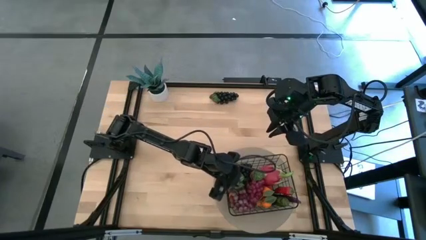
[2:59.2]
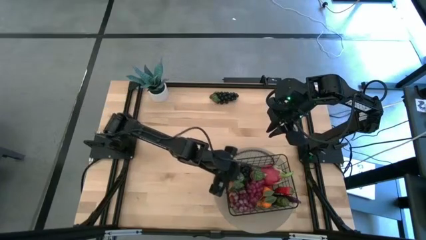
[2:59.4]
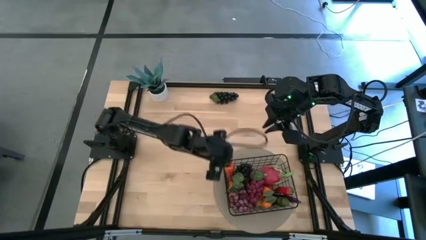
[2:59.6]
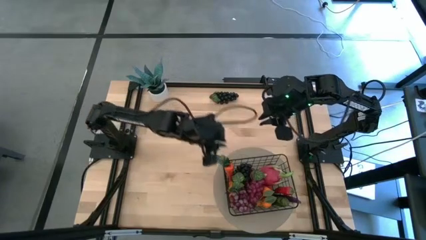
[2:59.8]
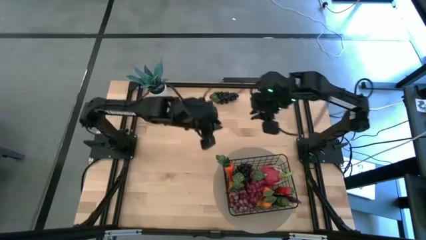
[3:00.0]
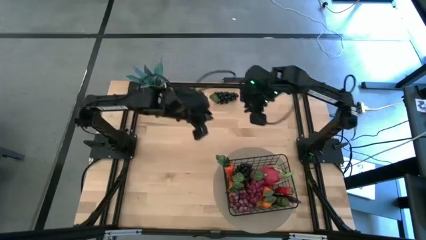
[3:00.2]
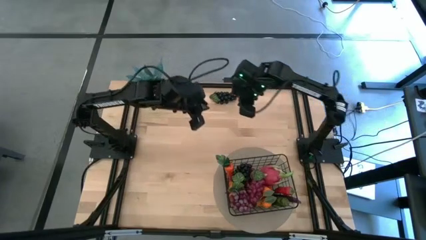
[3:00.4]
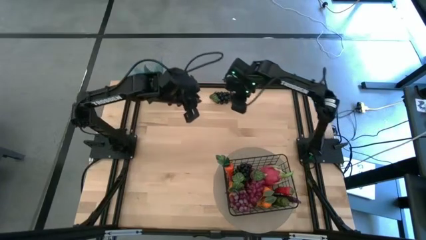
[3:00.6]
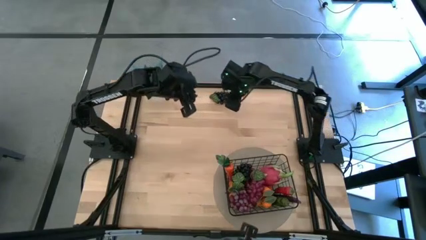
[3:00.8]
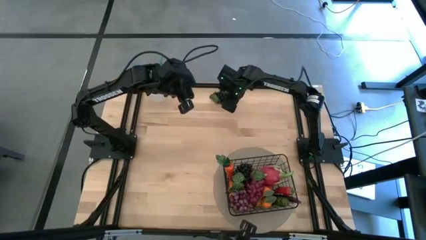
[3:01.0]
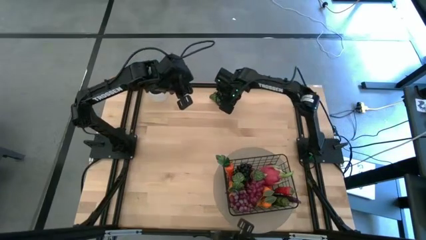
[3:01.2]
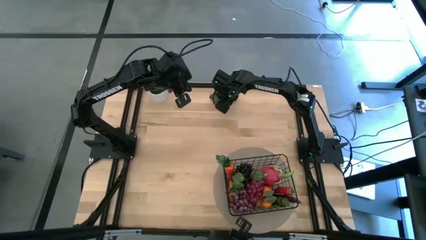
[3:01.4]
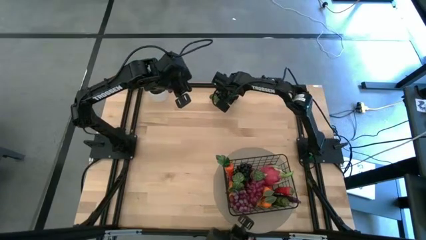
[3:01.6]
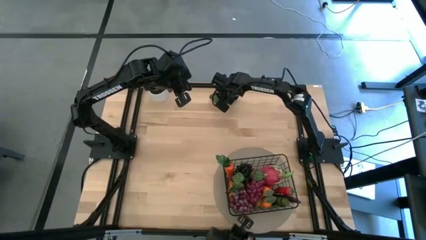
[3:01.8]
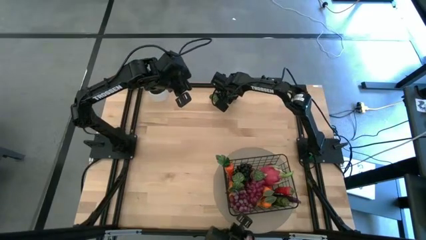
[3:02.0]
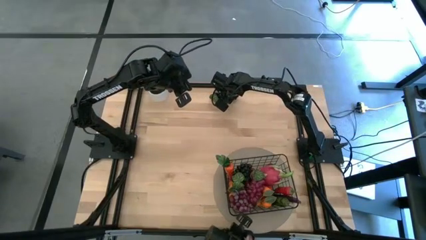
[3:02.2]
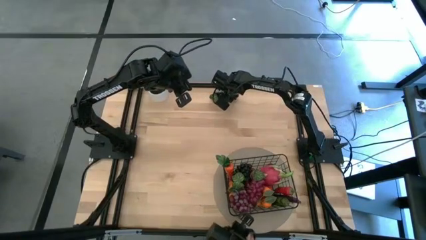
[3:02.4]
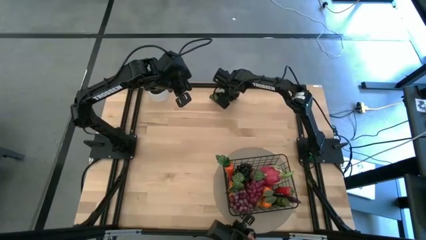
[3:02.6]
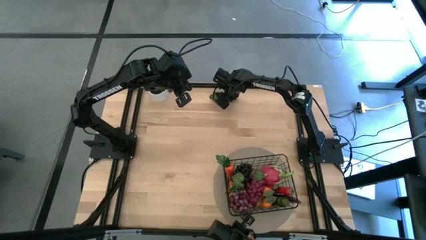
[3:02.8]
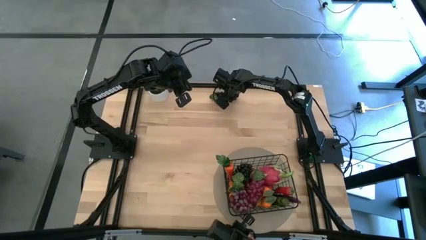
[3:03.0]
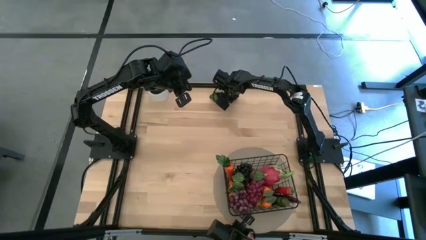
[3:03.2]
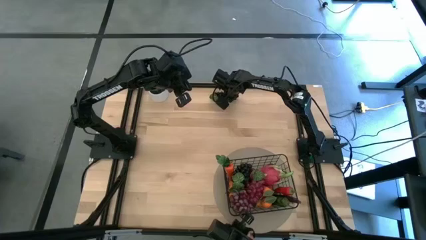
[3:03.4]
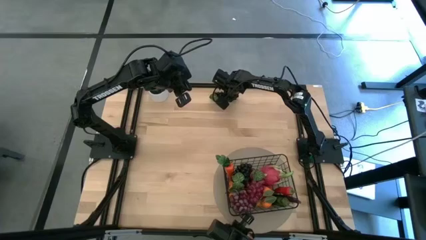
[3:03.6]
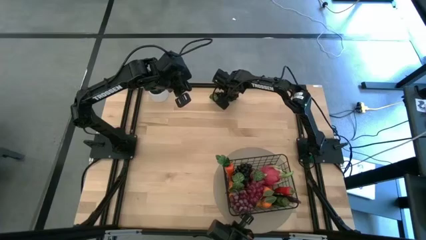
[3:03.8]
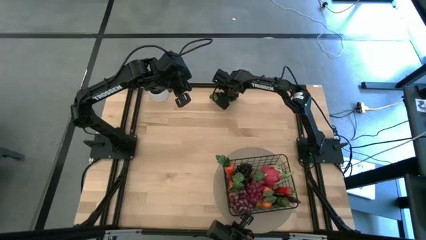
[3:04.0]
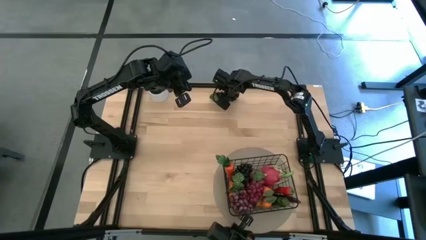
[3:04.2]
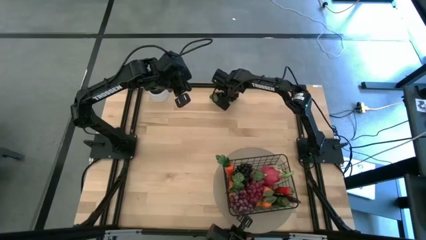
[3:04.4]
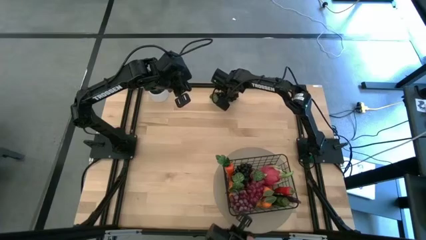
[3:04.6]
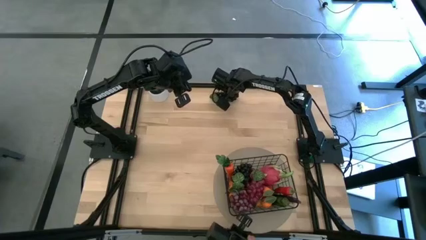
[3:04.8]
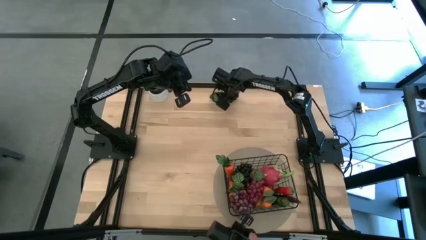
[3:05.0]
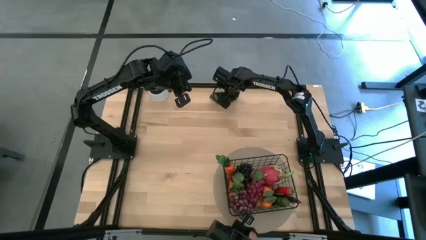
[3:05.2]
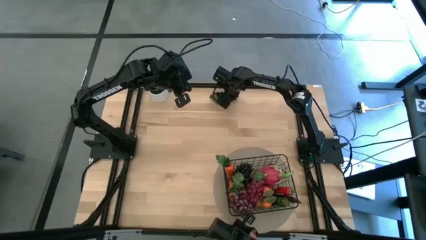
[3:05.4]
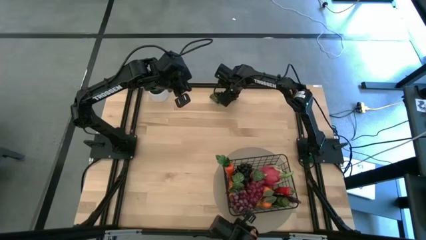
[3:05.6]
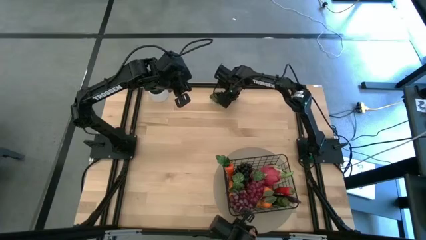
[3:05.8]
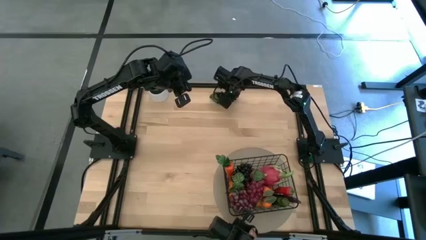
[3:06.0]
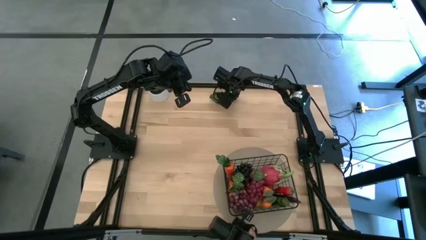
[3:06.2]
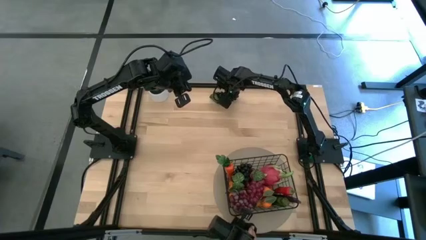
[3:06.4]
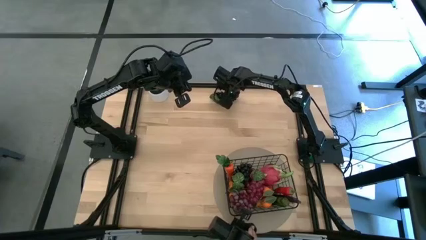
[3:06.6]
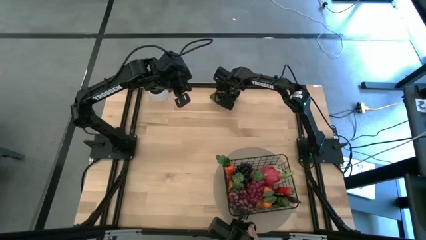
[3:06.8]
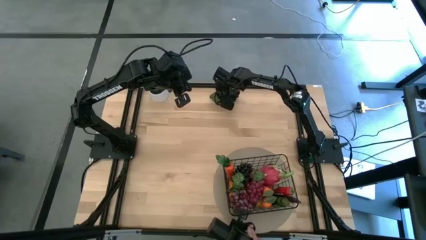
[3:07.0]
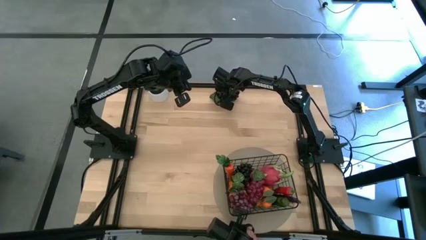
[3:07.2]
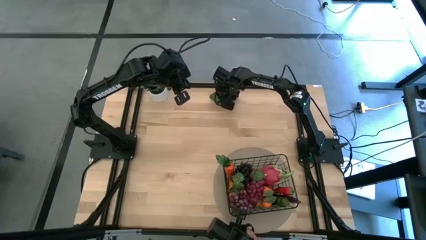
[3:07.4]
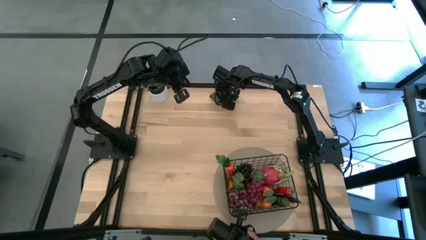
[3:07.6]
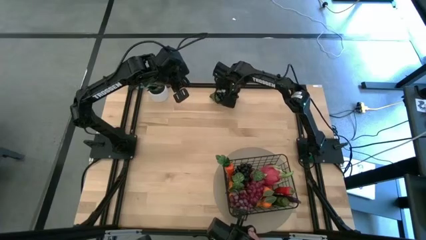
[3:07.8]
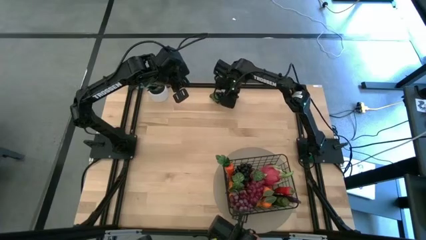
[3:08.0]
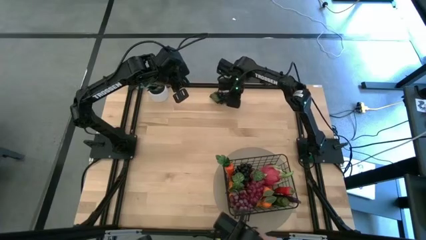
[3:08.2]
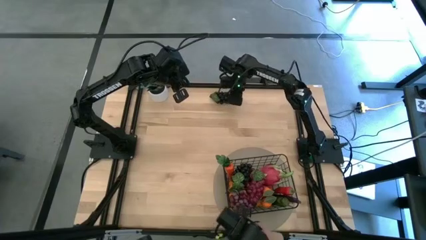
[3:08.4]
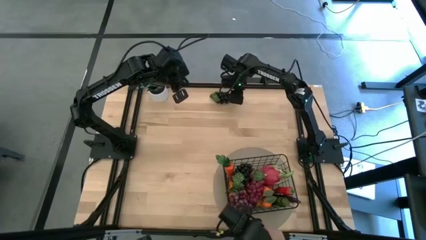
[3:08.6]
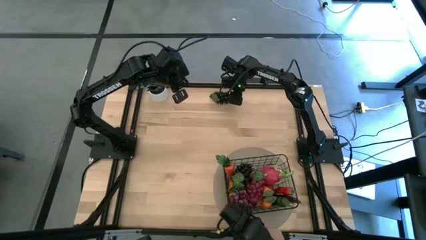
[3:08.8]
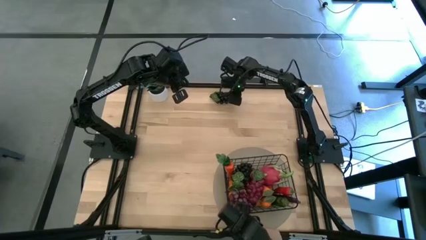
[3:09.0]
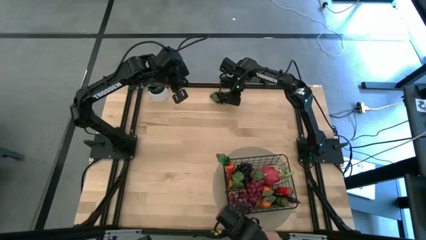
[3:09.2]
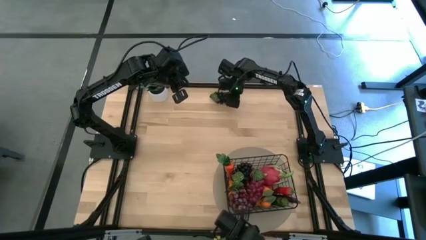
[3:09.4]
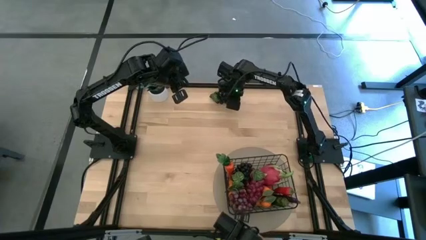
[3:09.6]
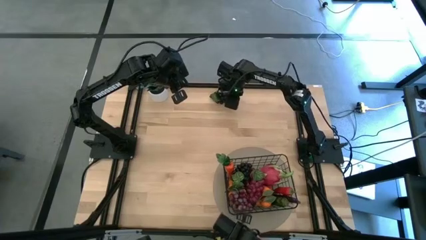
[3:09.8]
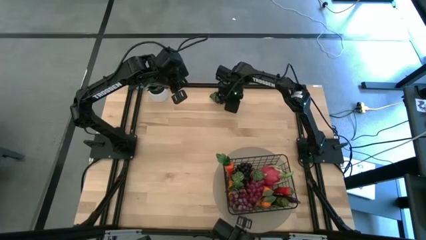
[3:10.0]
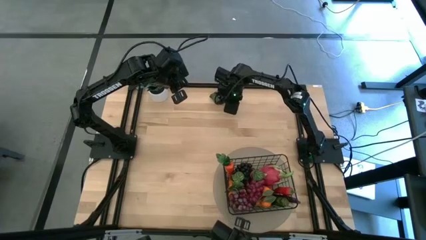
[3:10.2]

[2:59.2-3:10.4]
Task: Build produce basket
Put the black grapes into the wire basket

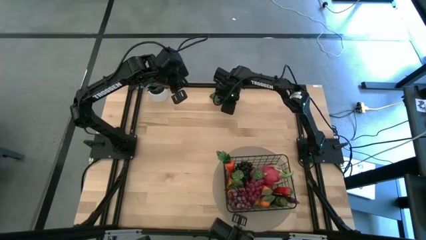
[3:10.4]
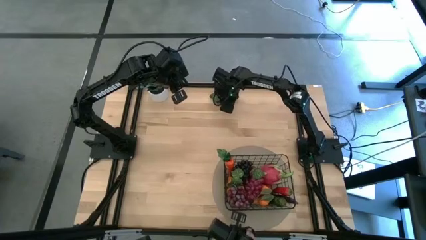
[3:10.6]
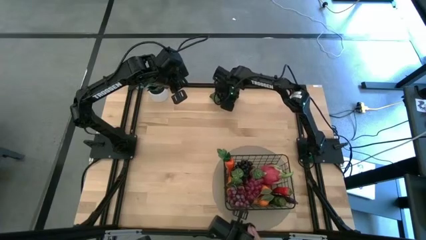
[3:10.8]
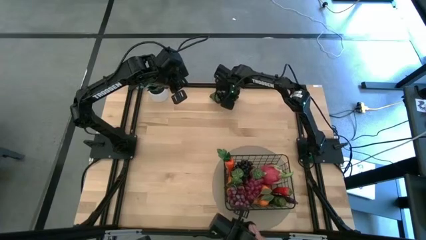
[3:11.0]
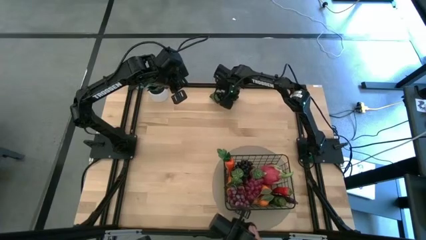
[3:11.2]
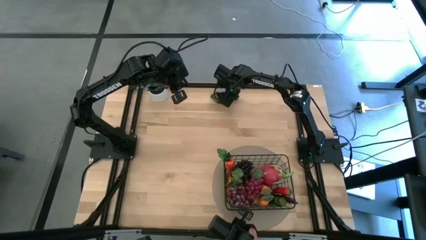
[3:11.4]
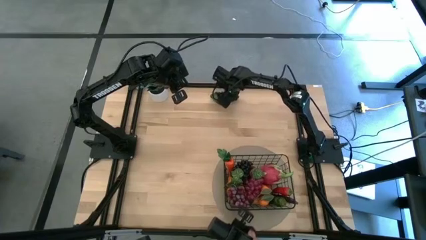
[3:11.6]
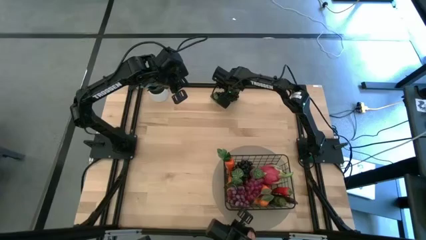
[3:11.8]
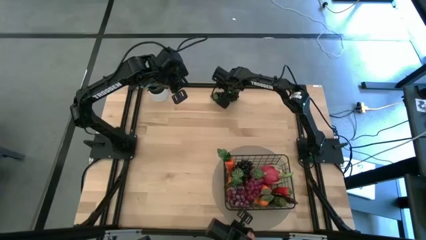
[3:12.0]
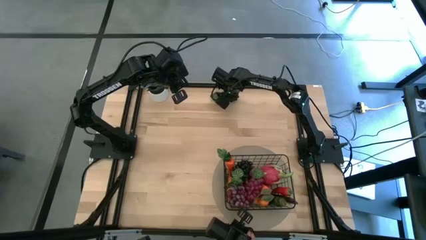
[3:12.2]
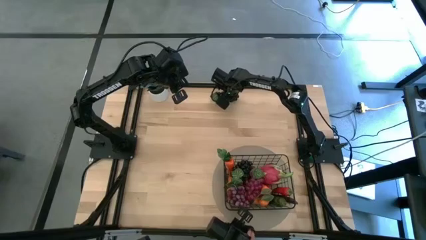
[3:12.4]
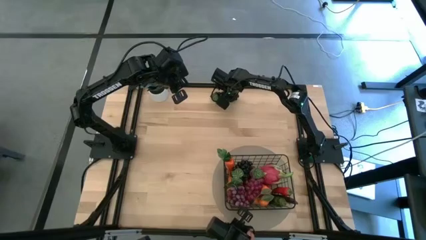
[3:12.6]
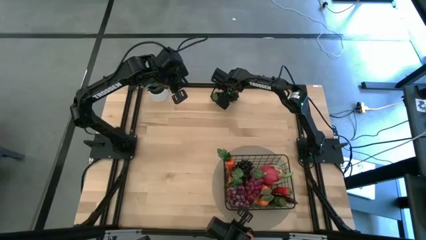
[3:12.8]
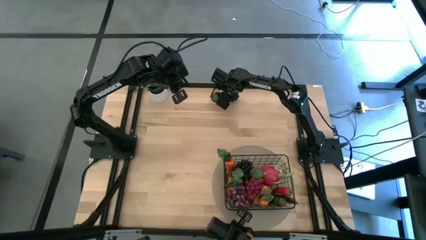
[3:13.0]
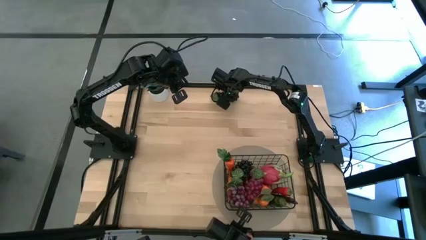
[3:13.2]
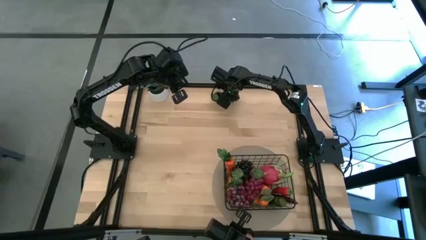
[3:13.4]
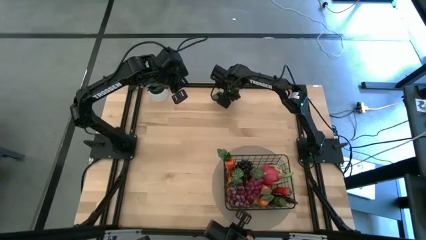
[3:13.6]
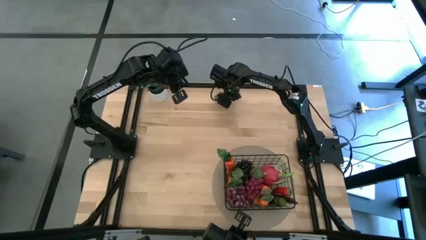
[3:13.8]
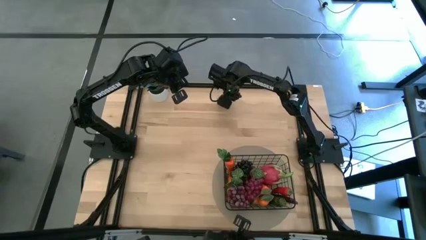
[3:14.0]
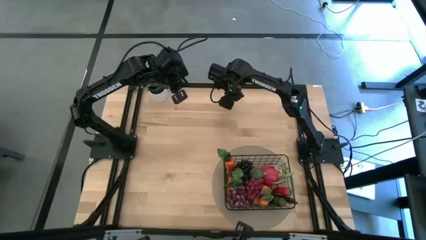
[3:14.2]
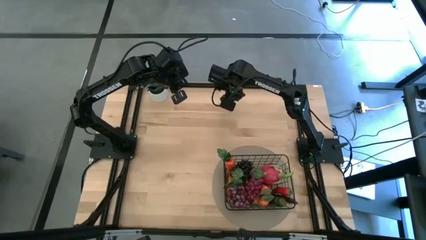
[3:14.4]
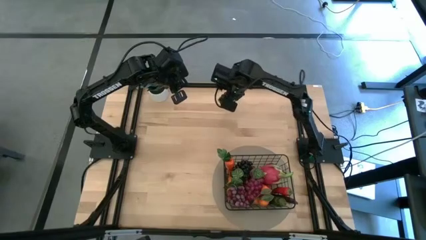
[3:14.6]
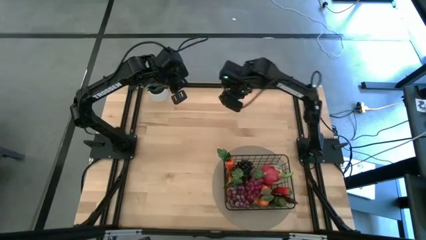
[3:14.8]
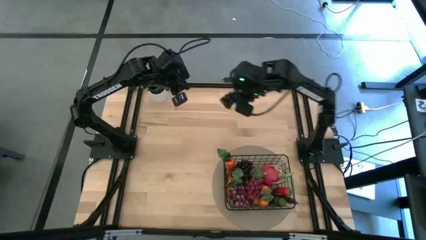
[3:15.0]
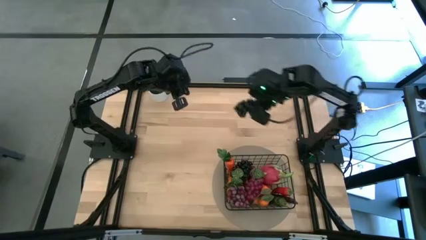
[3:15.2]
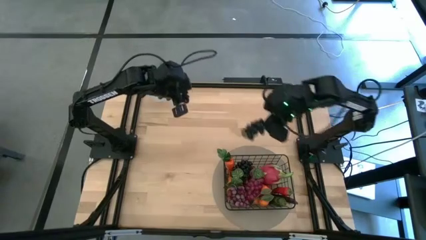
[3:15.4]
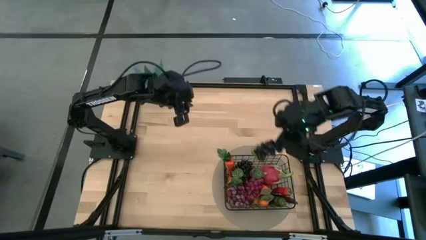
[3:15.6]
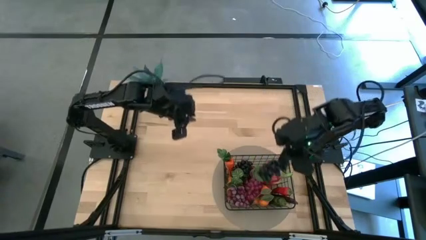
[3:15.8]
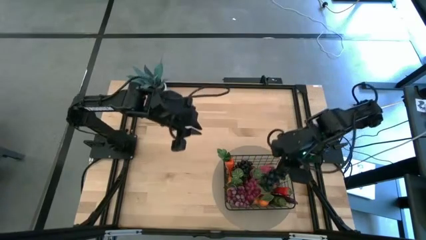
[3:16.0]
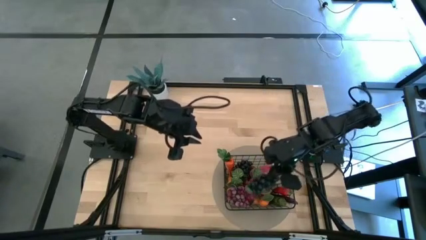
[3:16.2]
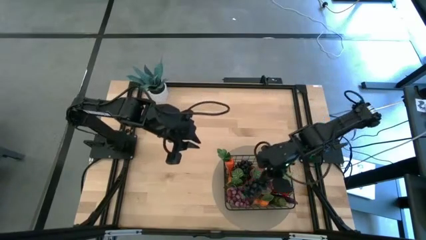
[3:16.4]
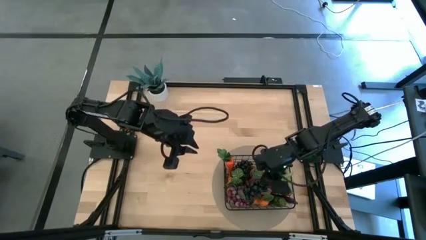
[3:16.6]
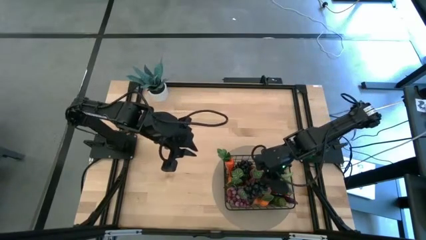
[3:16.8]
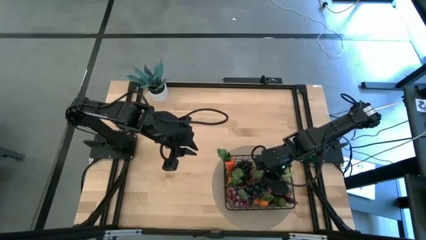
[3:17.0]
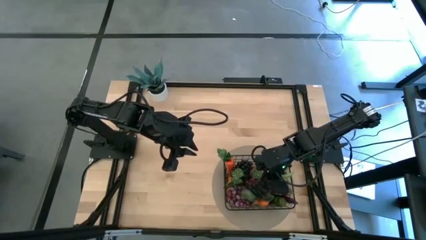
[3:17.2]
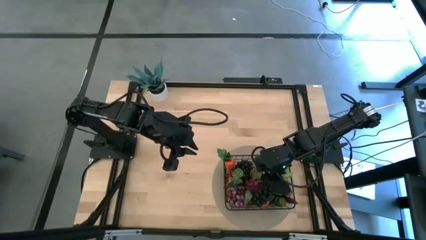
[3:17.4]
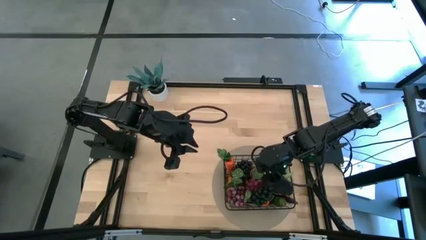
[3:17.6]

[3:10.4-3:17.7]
Put the black grapes into the wire basket
